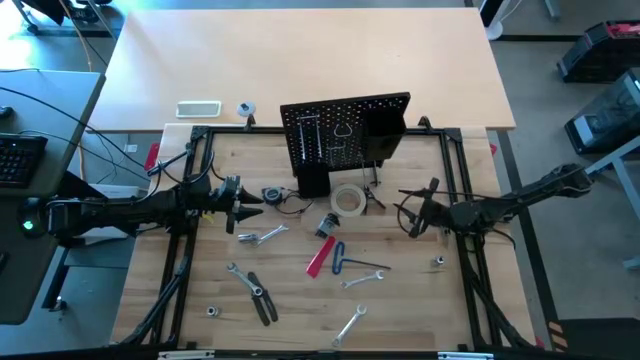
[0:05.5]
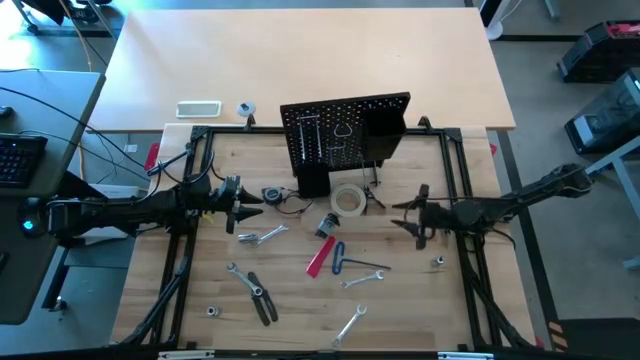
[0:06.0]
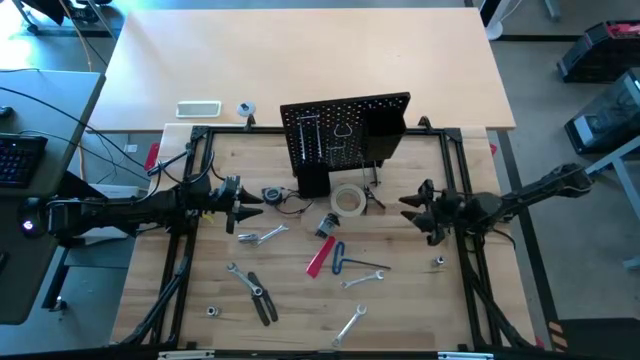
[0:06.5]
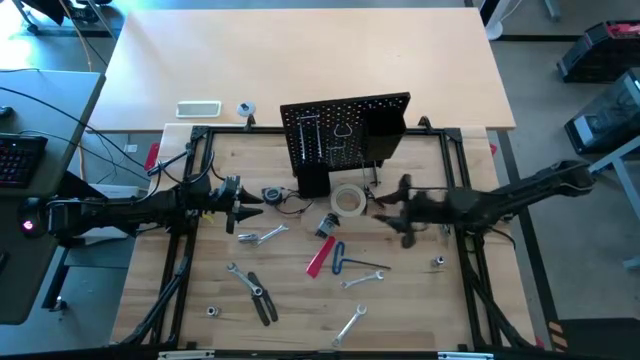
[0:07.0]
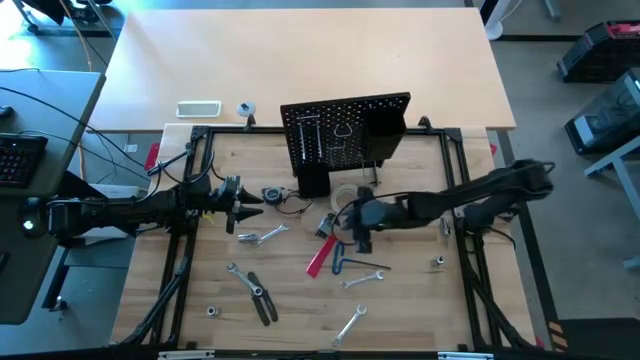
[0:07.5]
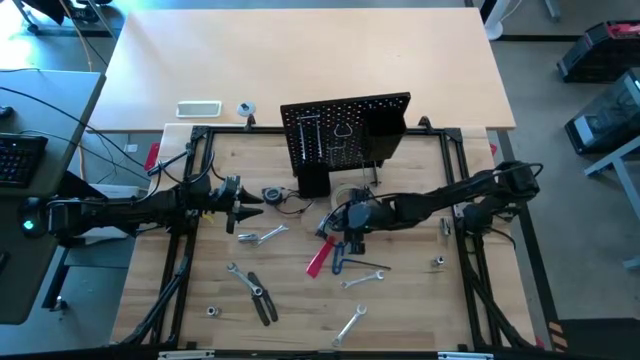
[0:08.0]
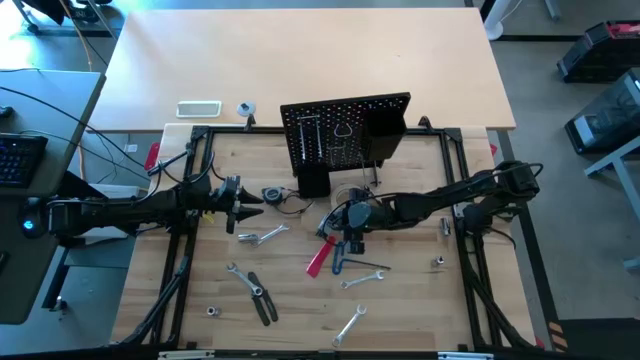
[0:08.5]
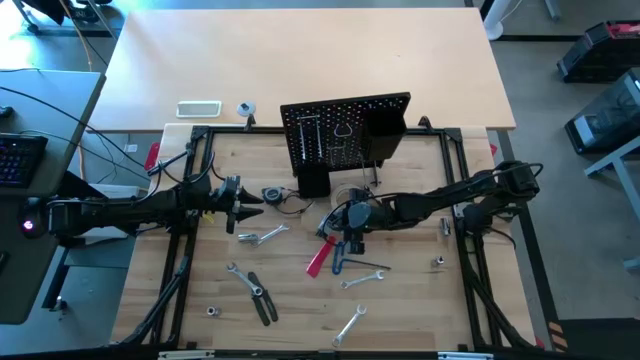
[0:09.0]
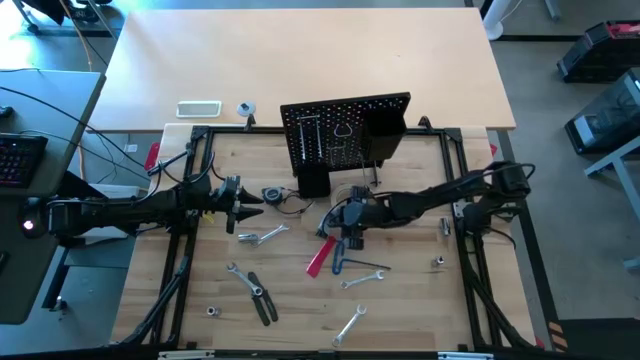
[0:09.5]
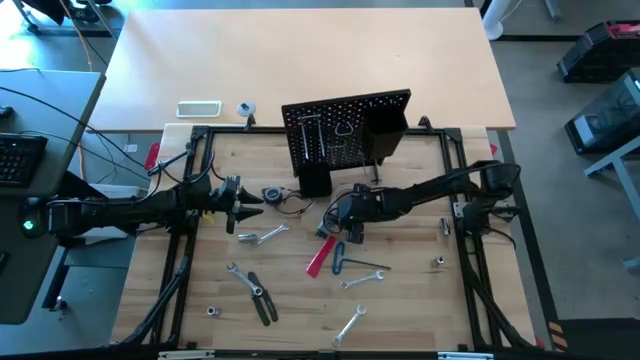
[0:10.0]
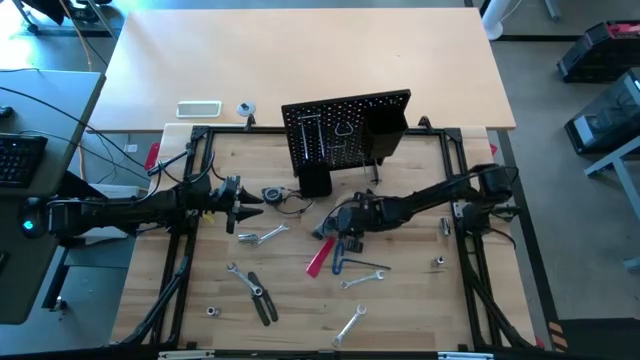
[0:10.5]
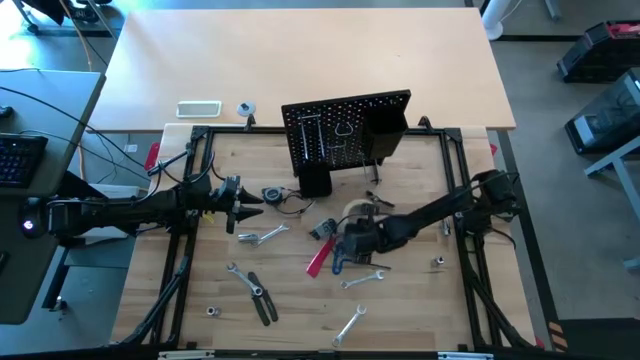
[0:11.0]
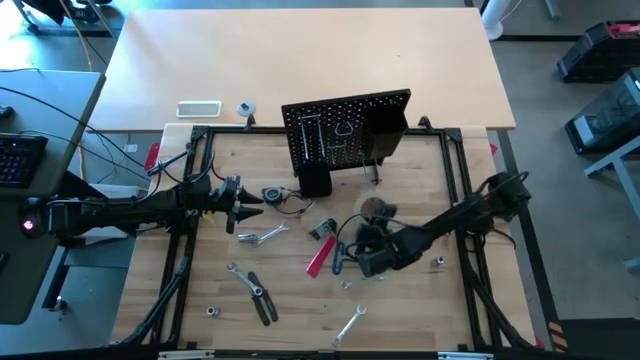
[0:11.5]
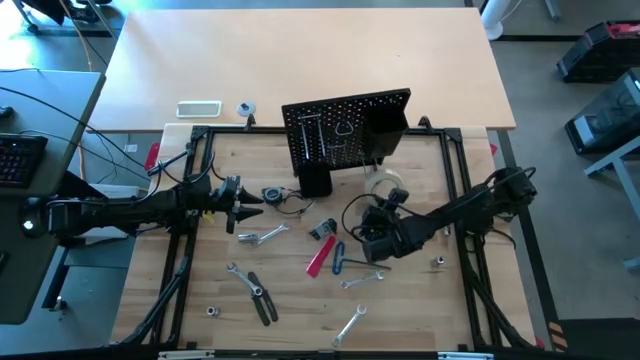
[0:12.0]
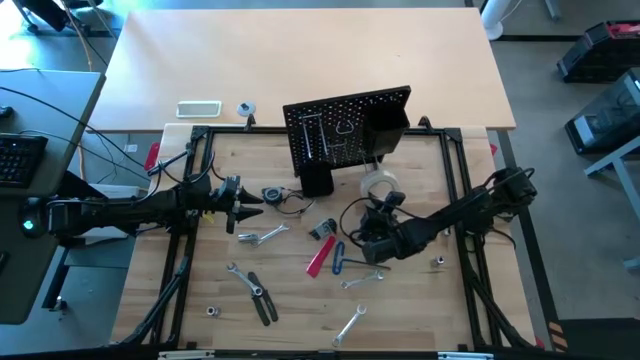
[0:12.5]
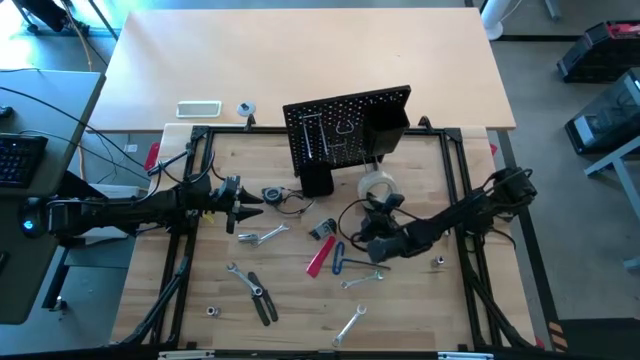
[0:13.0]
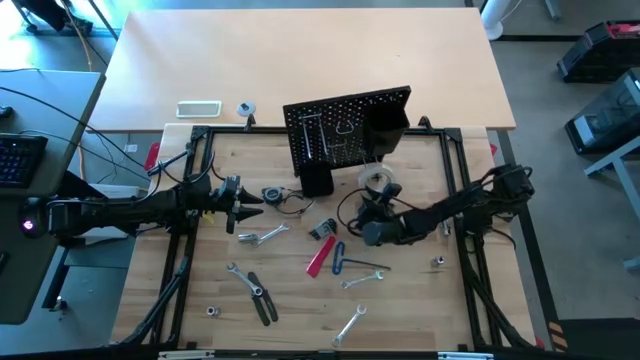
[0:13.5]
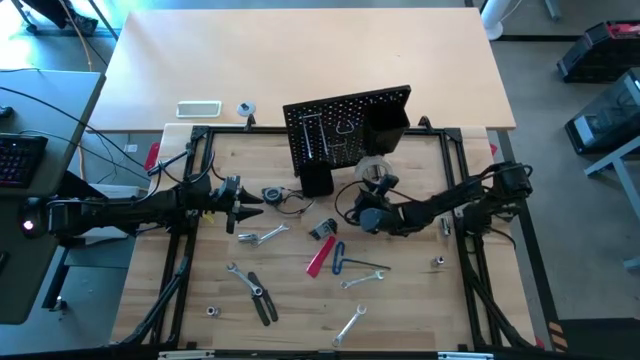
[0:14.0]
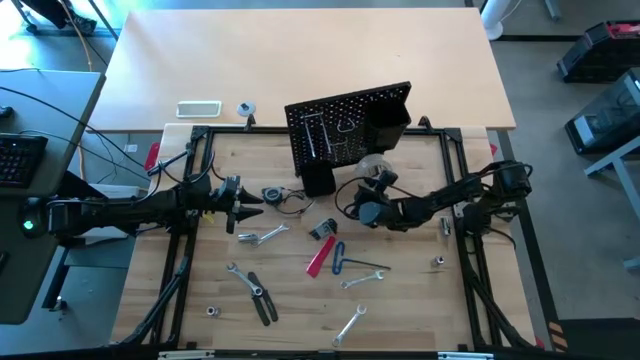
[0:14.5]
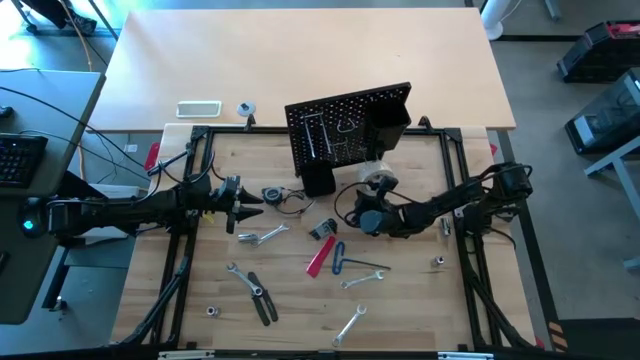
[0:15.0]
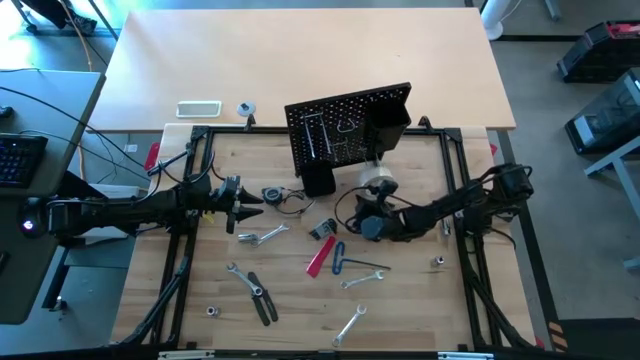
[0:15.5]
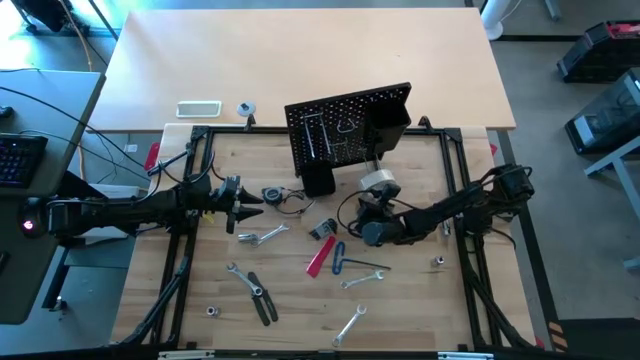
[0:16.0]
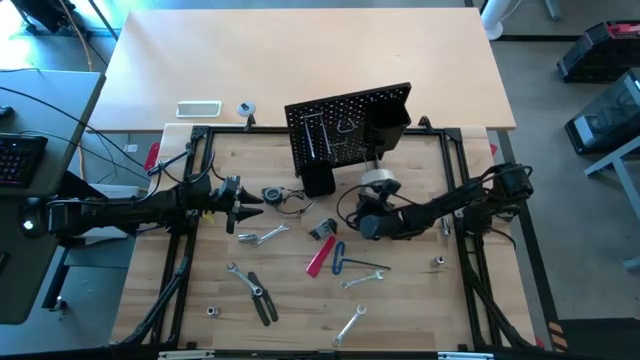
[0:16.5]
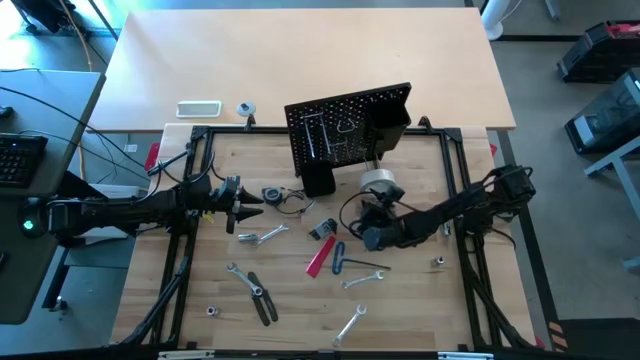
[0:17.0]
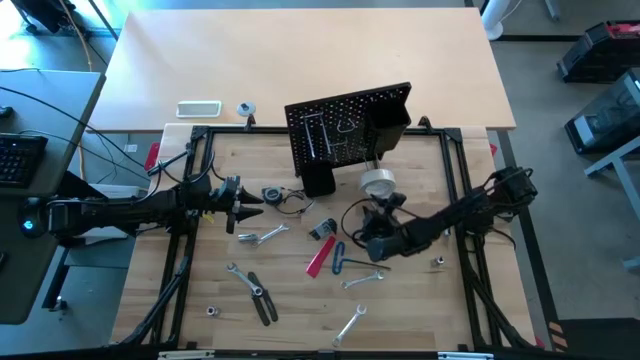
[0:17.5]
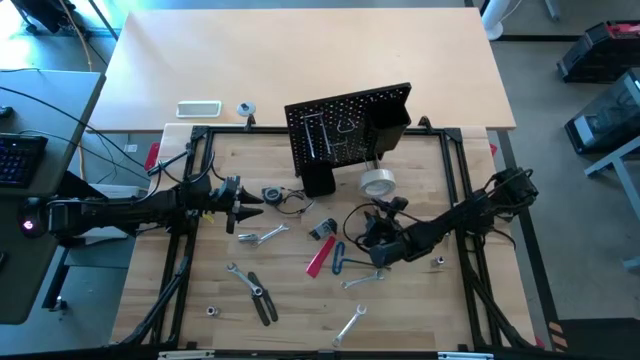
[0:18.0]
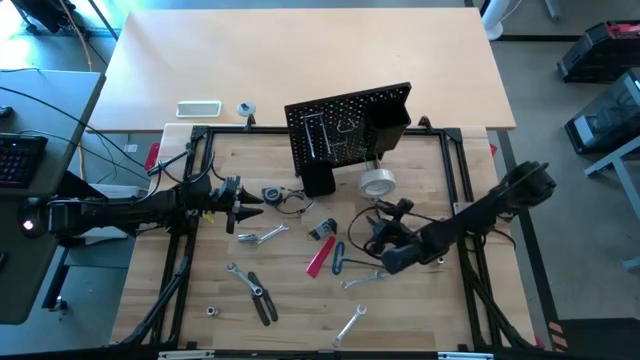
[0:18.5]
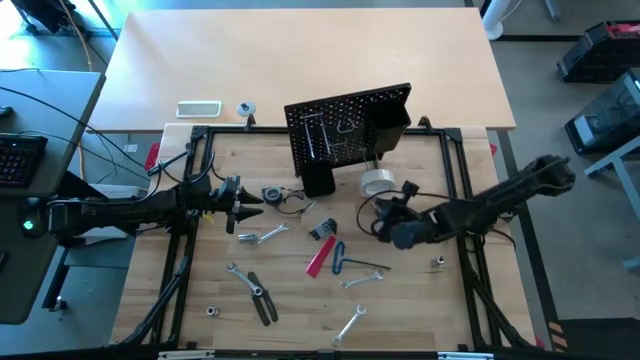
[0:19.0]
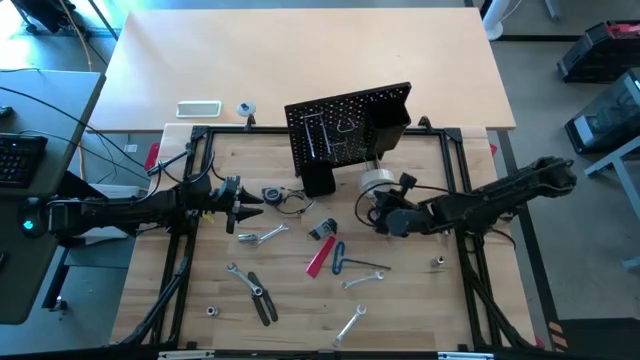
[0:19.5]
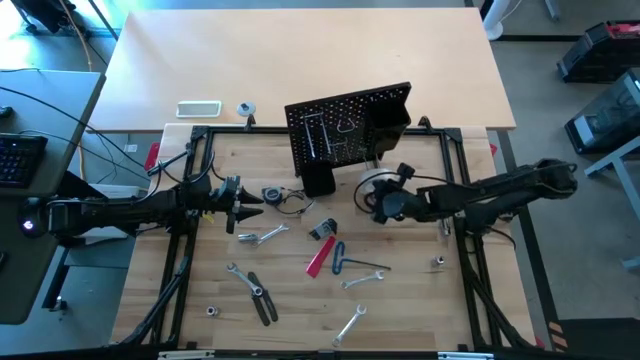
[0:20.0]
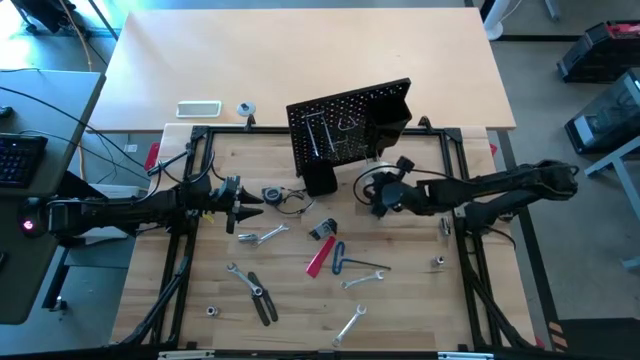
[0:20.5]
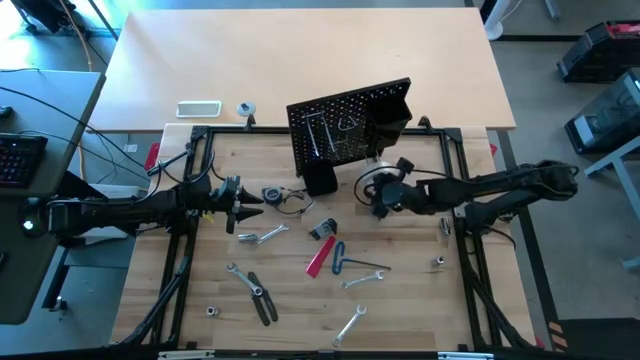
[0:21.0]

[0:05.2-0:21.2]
Task: Hang tools onto peg board
Hang the white tape on the pegboard
